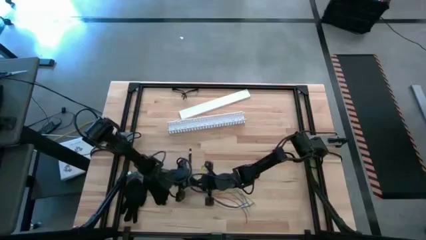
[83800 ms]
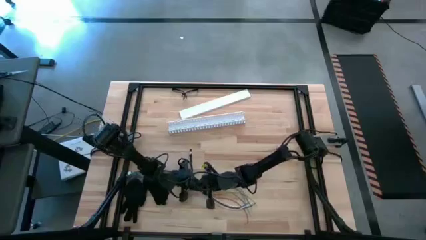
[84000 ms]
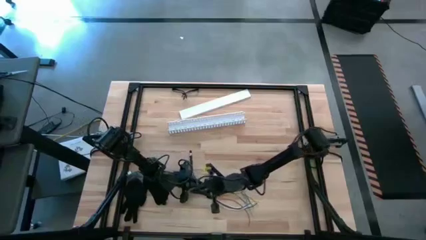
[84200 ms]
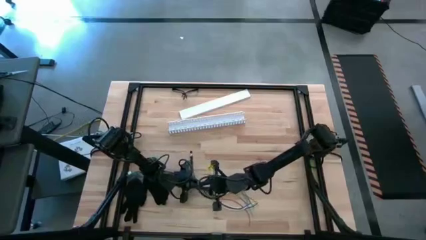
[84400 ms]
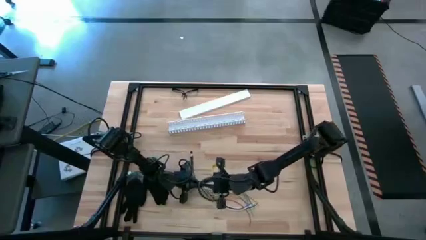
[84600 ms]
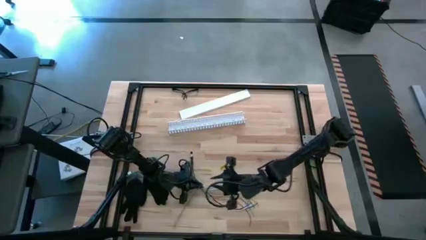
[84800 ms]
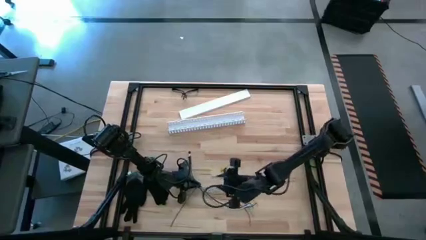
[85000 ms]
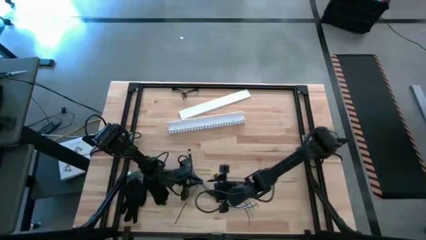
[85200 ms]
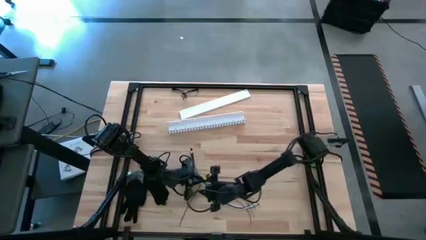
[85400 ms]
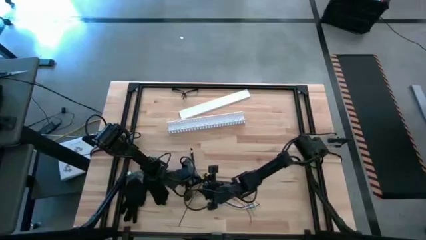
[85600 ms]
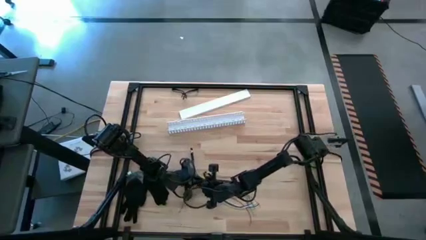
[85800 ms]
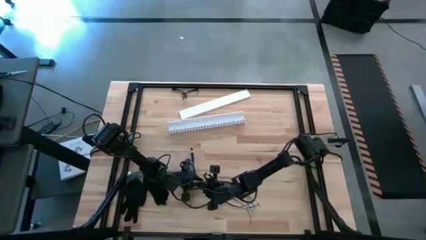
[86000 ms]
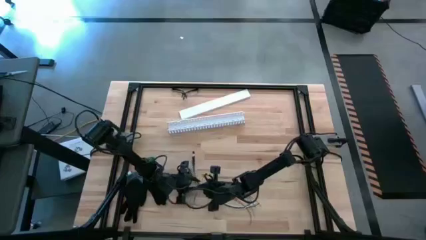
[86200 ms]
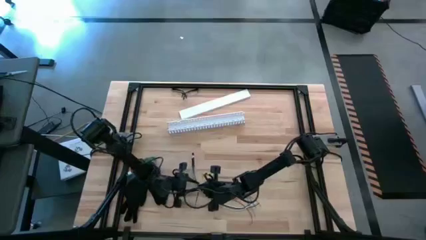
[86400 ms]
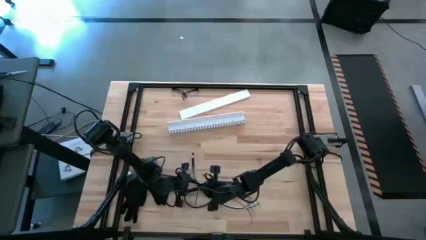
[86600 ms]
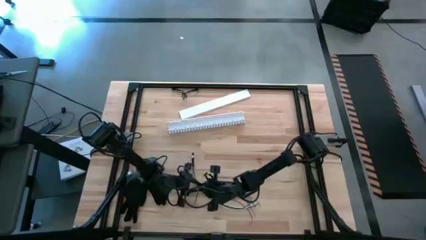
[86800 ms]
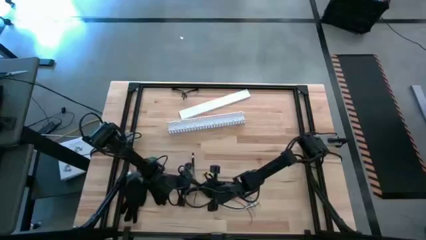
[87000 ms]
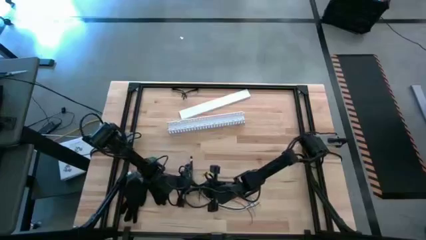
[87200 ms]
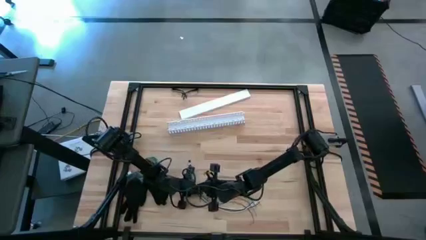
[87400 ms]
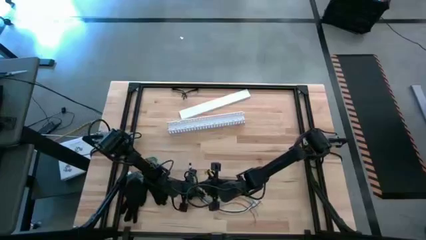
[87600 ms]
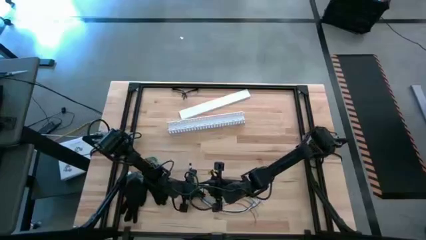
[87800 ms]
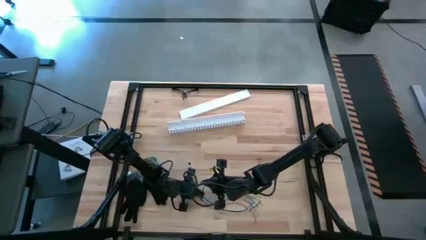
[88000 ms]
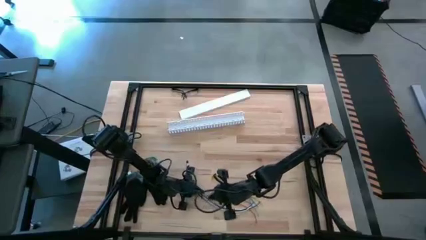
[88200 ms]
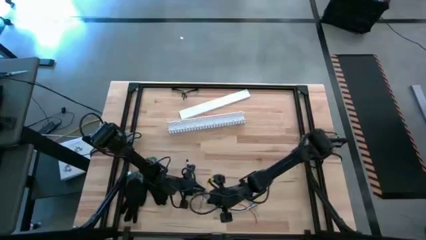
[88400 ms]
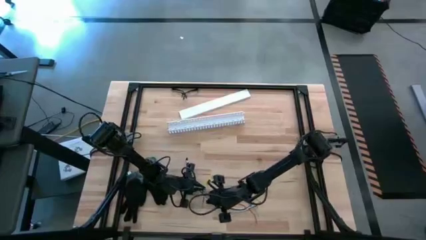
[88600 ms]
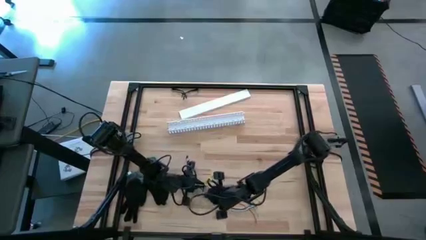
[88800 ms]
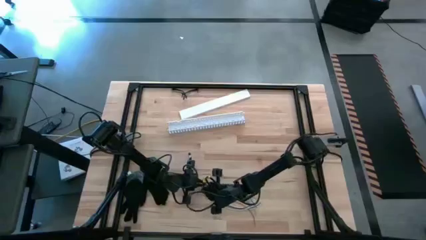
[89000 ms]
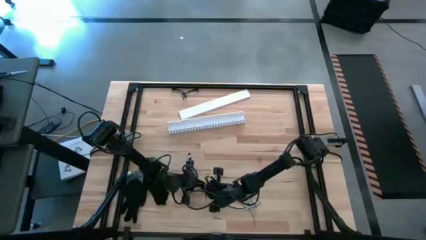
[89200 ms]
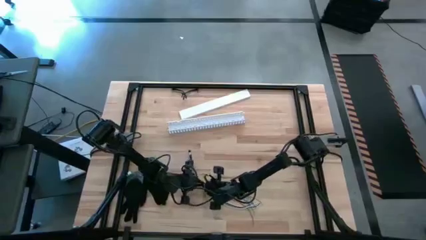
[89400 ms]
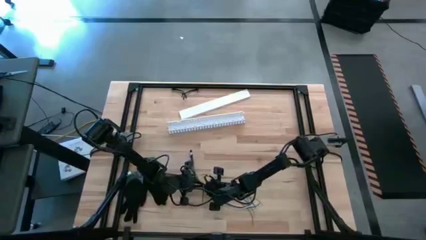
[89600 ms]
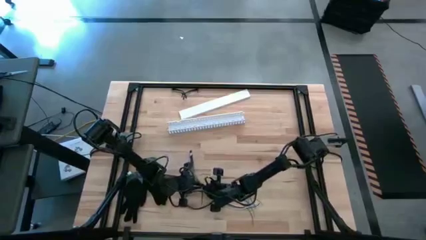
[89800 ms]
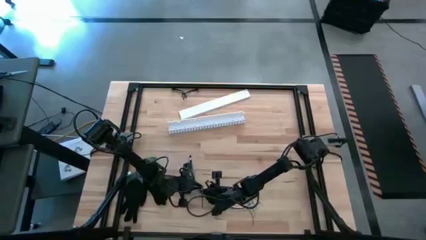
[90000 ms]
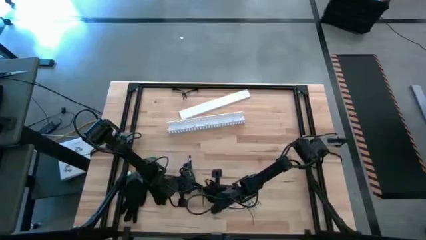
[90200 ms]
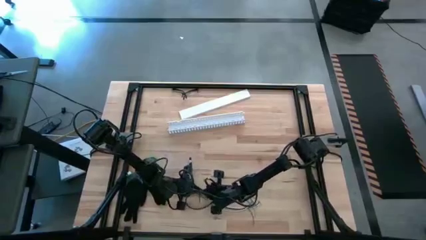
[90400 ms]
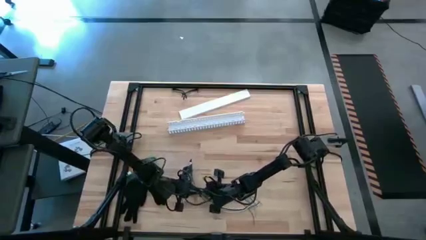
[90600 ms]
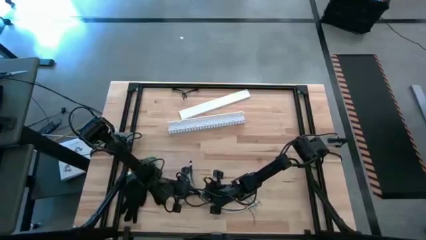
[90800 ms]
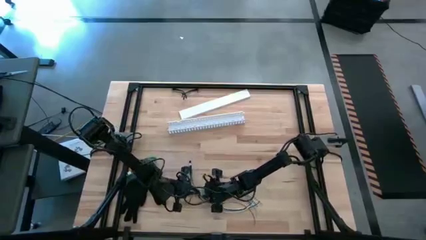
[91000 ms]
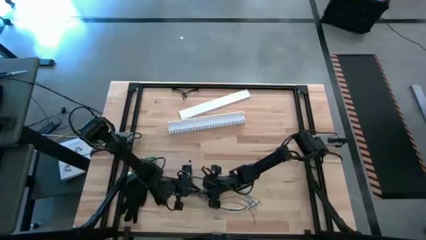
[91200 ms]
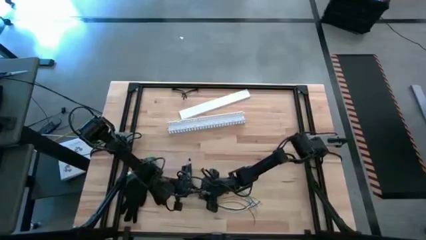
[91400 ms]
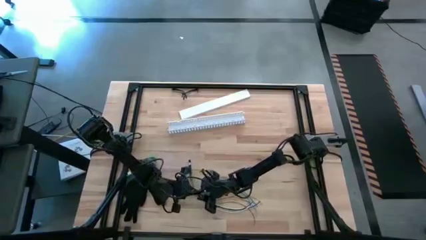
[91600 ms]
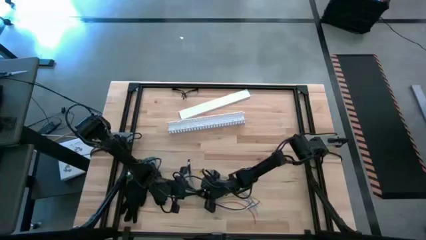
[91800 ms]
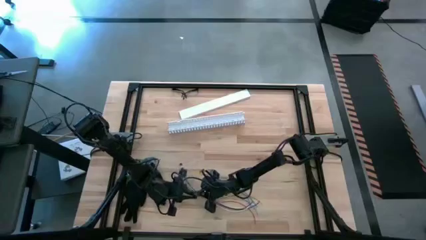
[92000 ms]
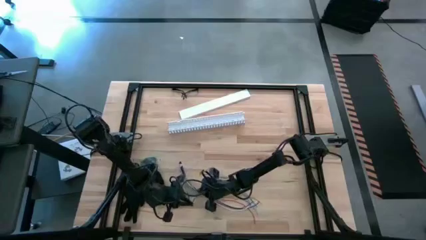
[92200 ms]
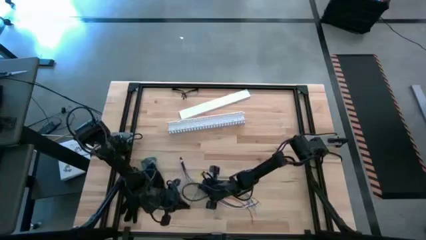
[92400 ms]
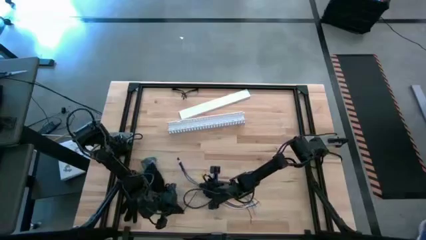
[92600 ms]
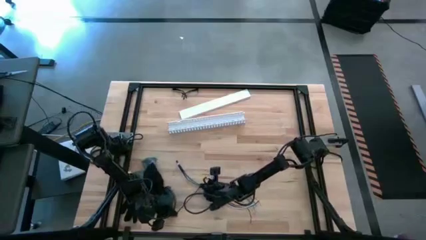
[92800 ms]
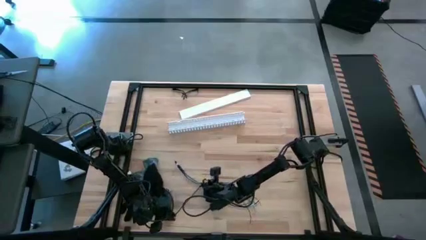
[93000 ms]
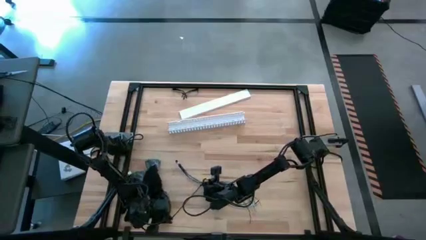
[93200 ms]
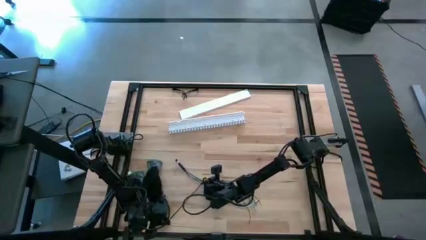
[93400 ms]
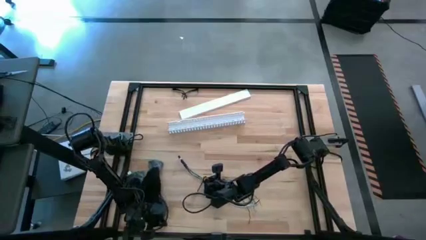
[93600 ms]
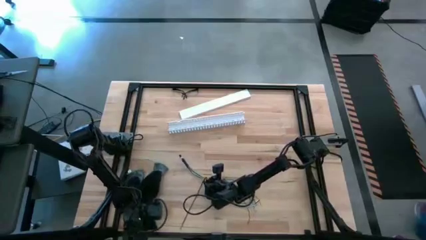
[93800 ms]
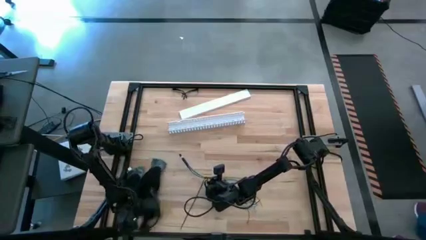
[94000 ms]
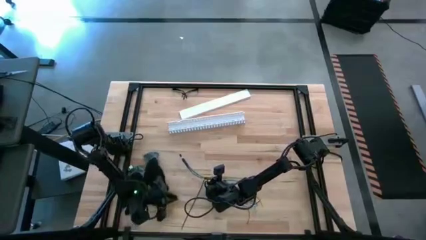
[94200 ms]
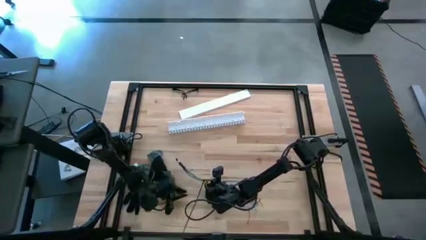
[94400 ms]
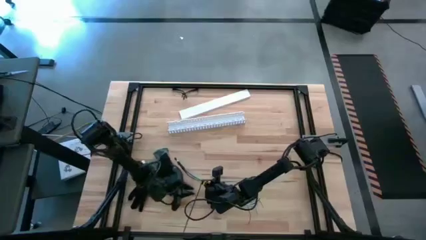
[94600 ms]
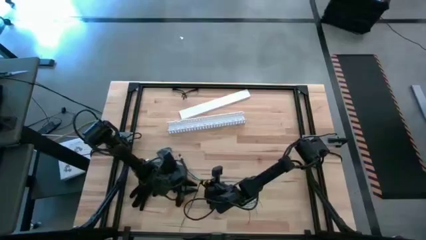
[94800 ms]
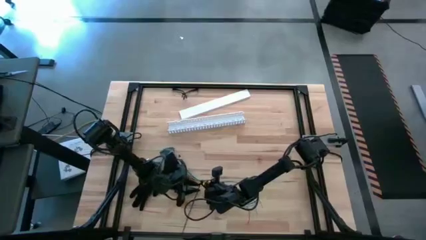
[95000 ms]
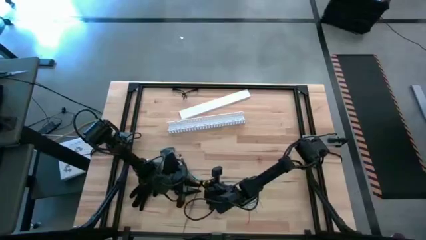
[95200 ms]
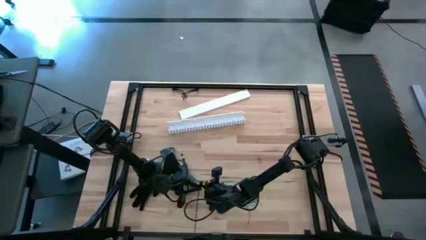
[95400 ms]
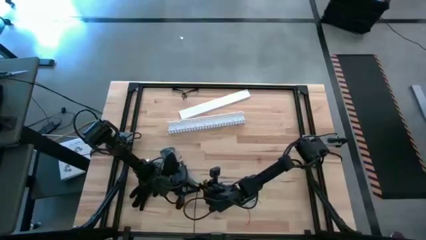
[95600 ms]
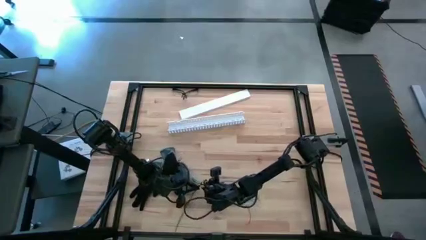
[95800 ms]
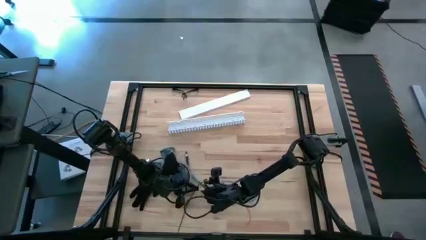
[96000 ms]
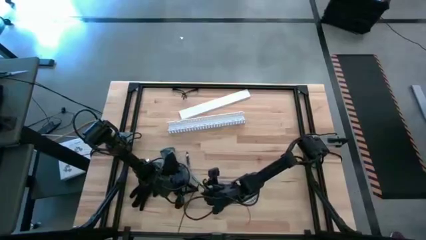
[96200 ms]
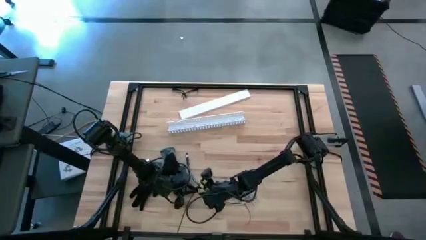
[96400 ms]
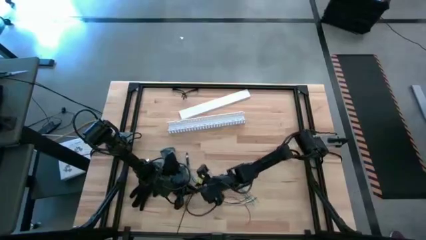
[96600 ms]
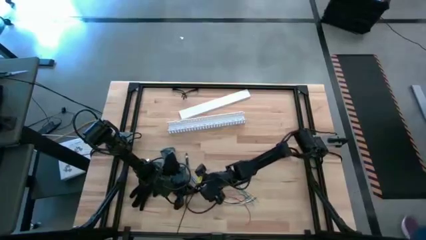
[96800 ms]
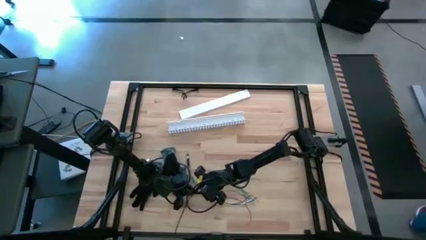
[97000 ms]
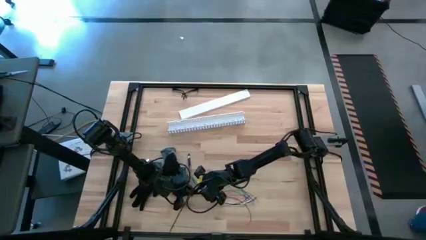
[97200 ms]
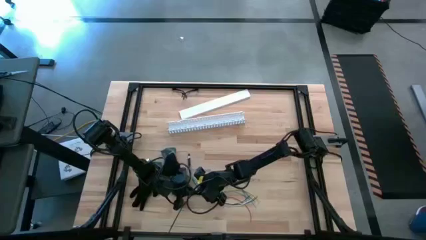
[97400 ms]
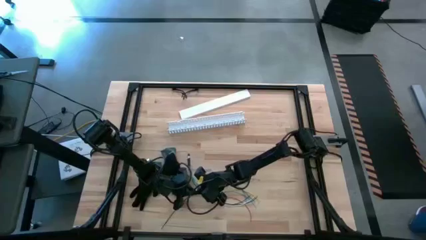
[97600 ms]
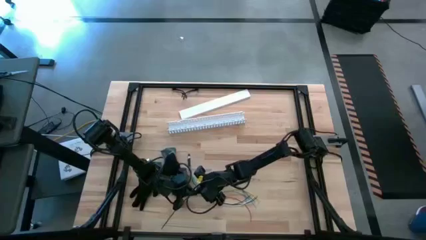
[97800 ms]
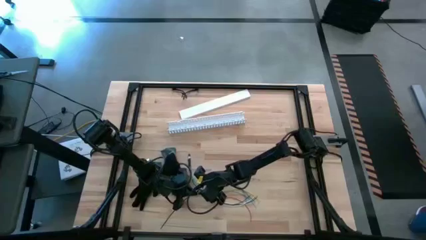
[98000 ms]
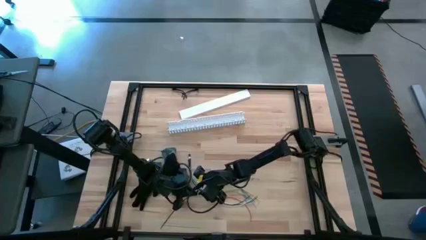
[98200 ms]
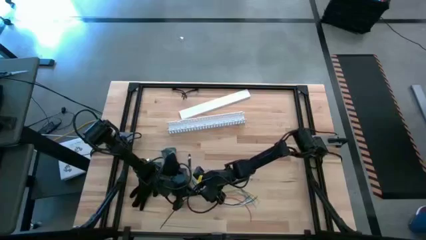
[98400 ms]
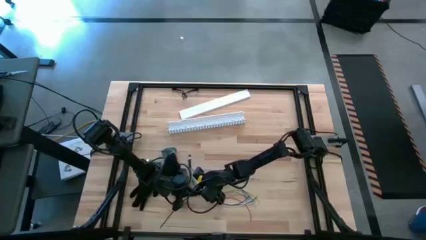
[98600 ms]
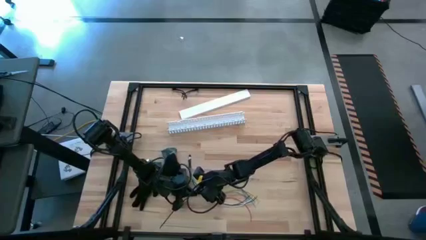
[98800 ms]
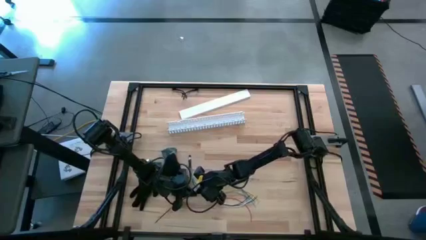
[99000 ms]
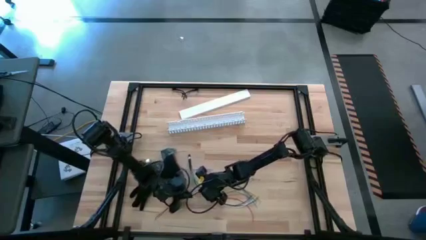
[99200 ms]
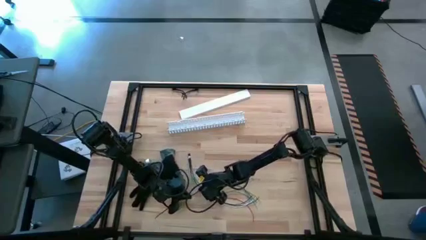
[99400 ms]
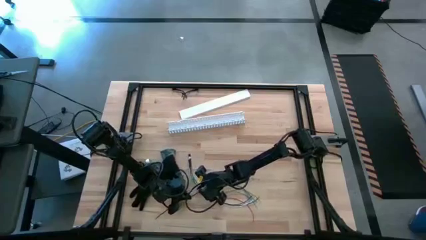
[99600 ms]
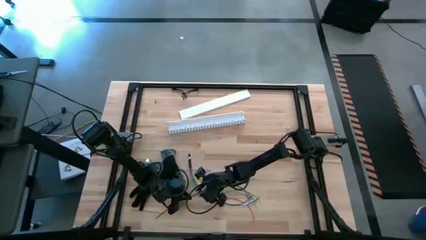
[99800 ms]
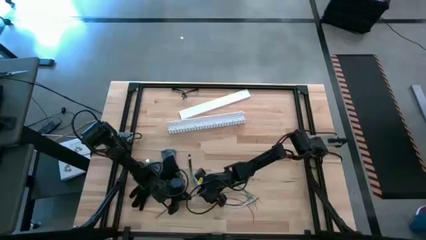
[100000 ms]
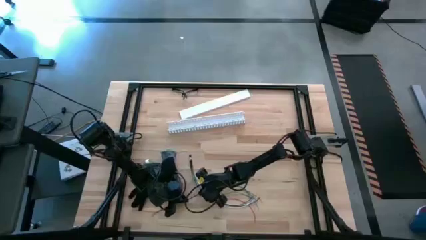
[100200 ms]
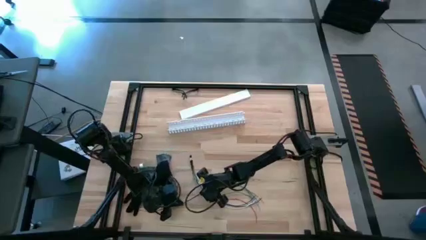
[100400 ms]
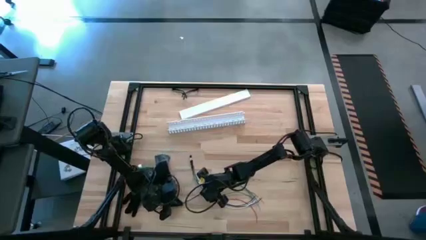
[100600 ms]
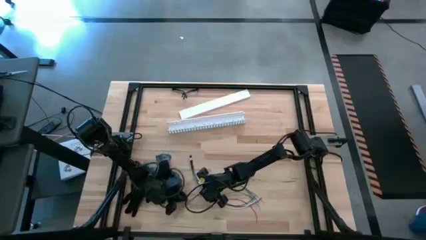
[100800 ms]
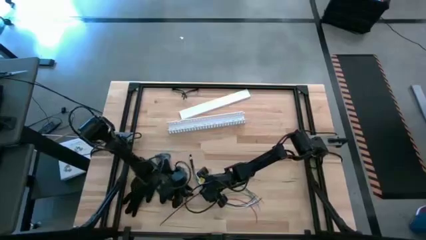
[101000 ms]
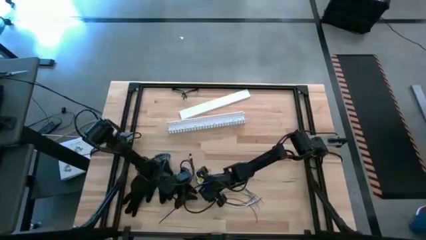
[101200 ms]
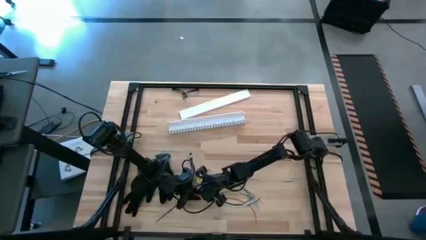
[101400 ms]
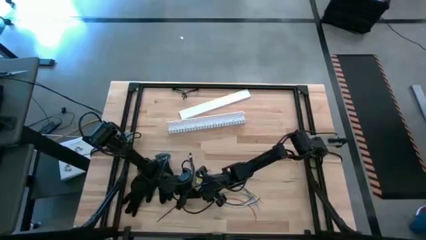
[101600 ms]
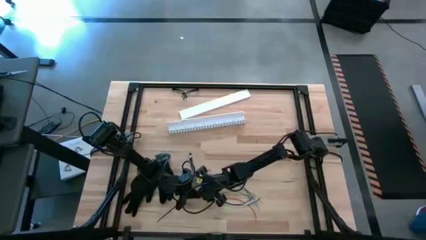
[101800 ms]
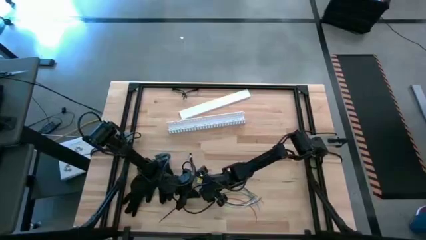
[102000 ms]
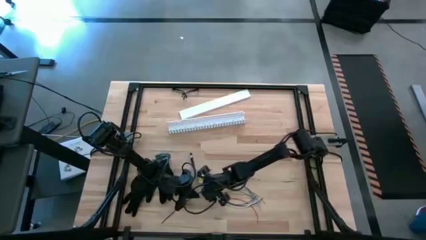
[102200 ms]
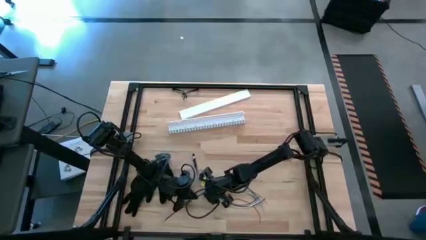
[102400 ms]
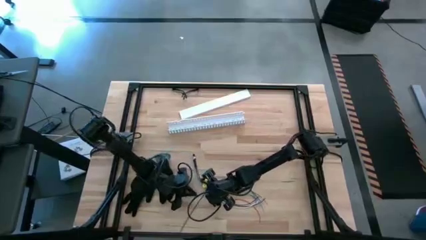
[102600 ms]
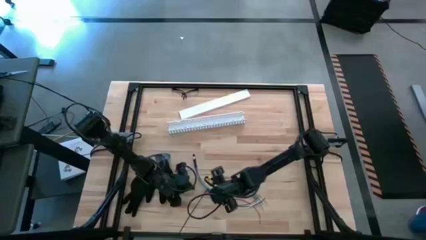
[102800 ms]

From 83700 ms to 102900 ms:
Task: Ziptie cables
Wrap the black zip tie on the cable
